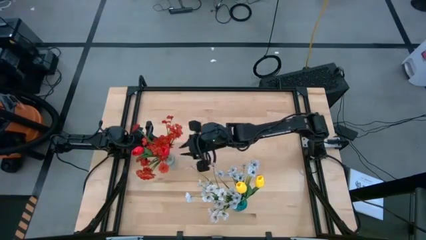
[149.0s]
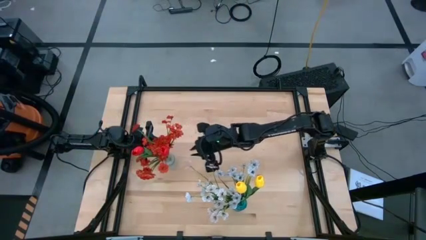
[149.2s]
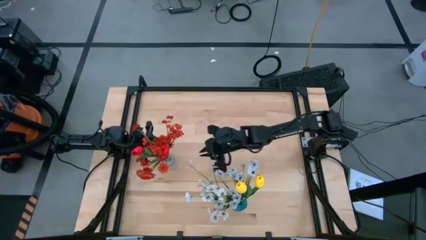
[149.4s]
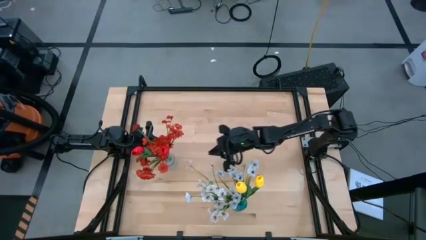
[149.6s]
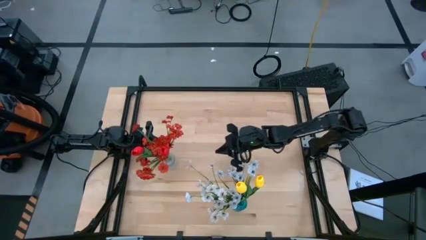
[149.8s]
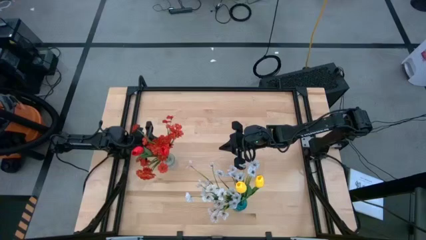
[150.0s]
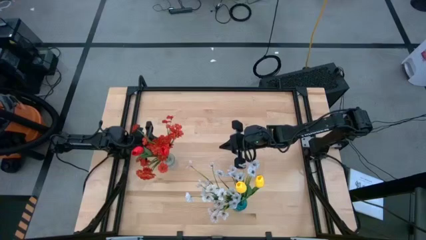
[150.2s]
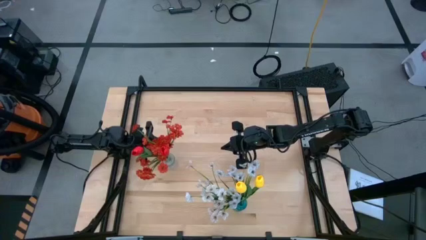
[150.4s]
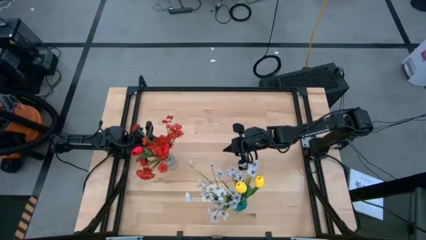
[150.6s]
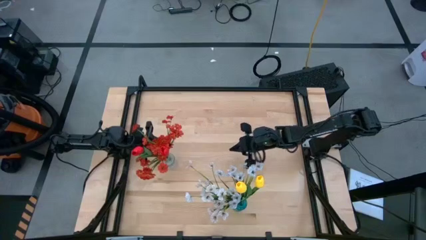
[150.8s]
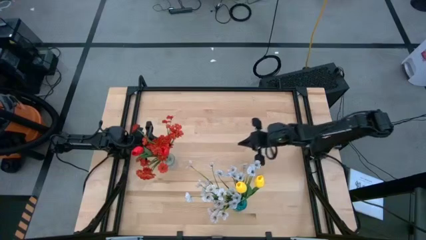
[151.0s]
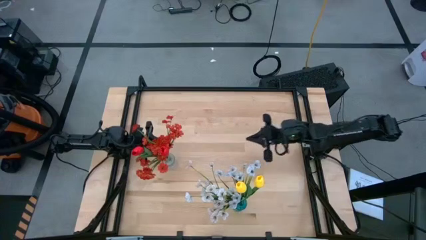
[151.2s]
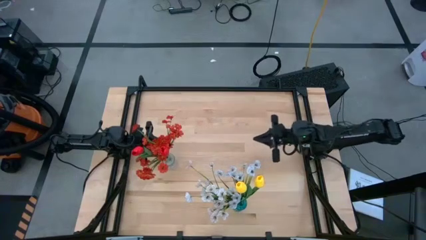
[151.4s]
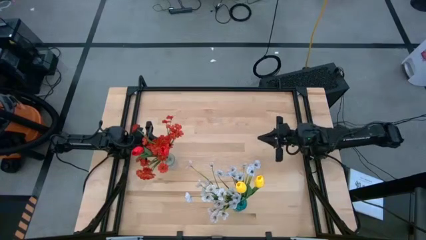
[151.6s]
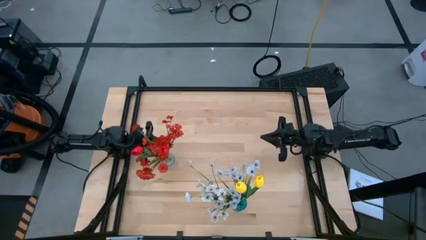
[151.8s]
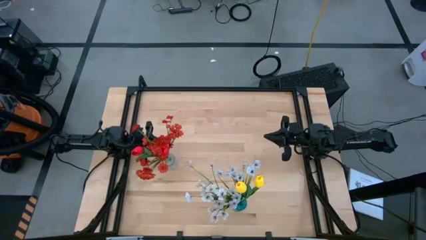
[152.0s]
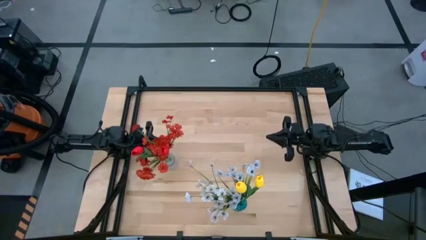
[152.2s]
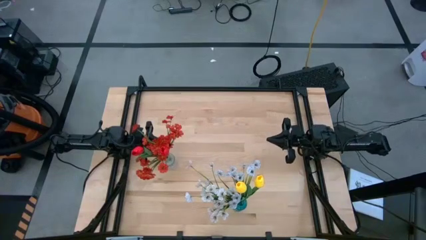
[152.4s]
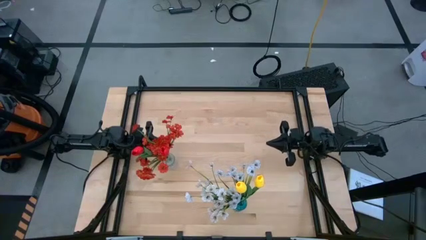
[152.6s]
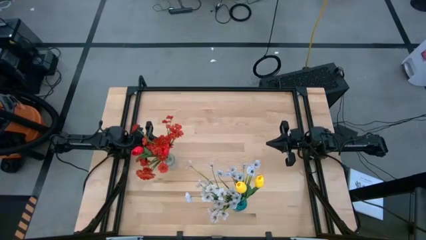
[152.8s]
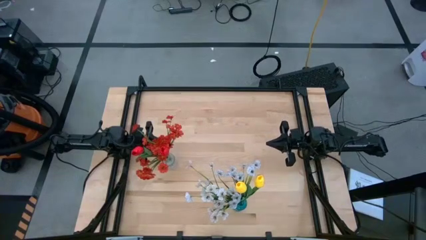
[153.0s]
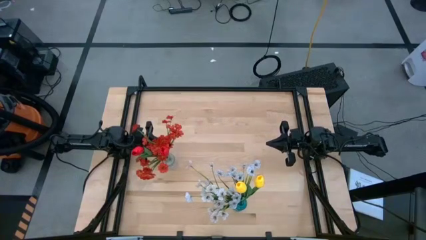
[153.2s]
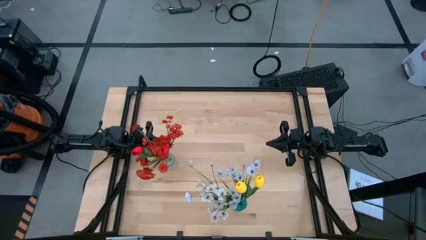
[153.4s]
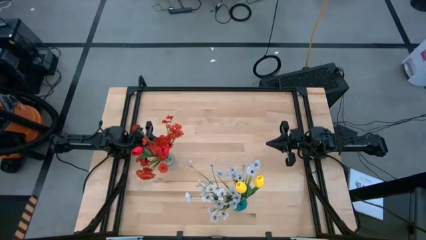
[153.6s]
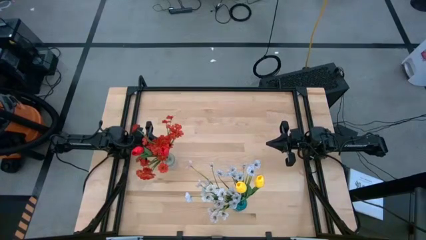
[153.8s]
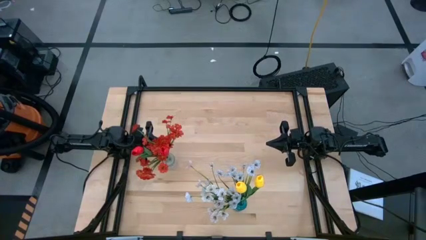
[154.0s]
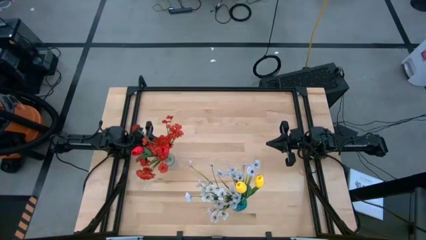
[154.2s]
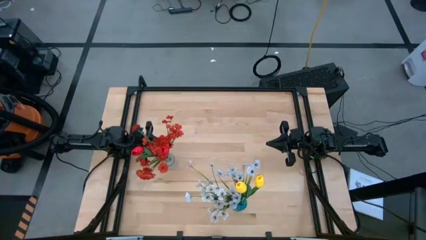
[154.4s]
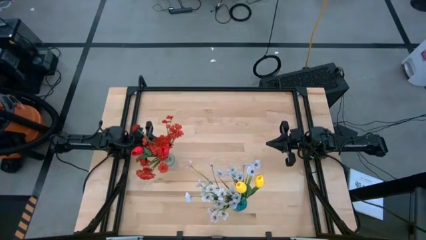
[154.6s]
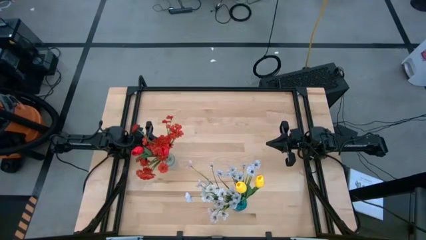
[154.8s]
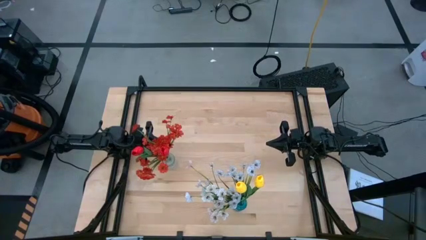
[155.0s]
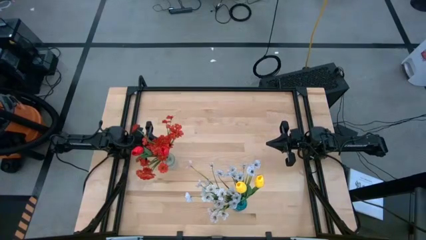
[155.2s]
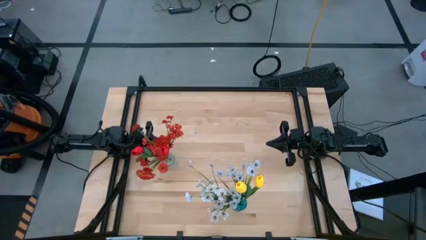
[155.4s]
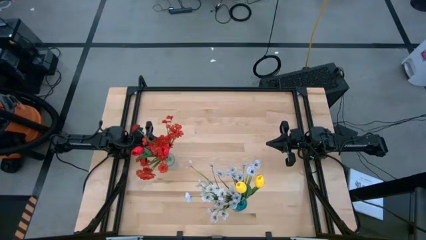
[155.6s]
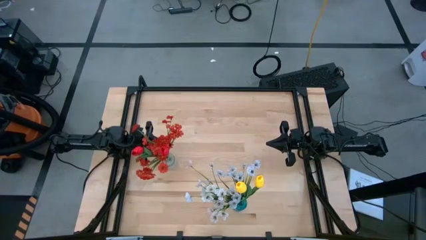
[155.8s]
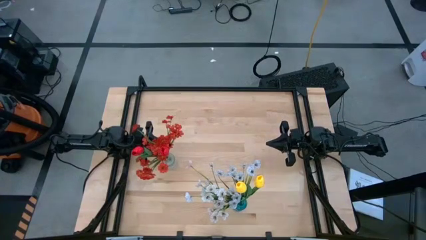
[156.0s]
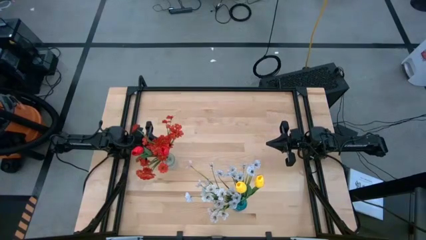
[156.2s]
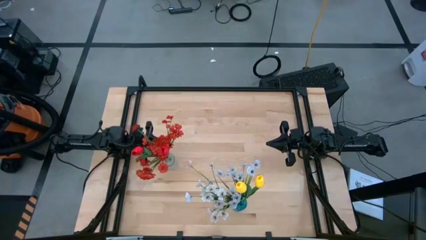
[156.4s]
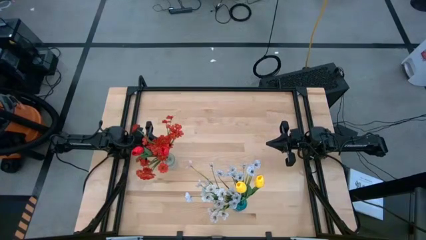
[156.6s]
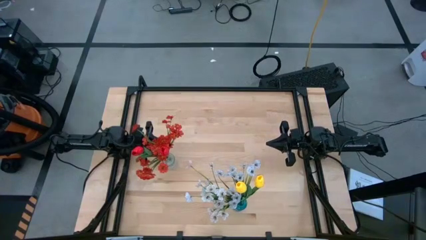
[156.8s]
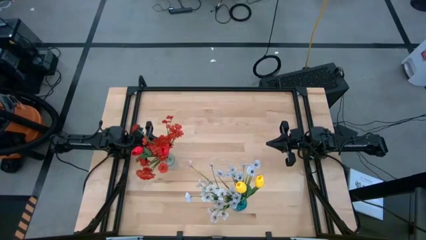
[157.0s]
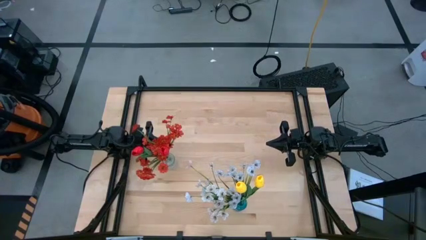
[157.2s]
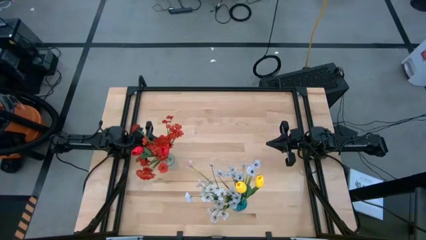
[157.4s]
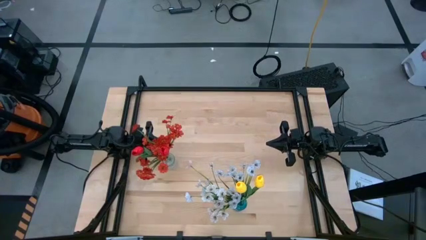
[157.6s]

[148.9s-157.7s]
Task: Sort flowers into vase by color
Return to Home Position

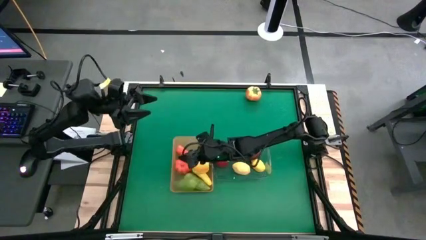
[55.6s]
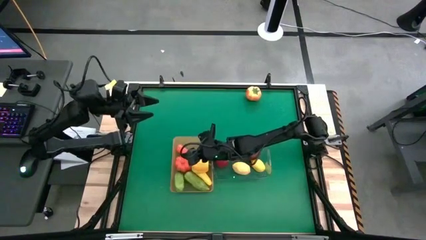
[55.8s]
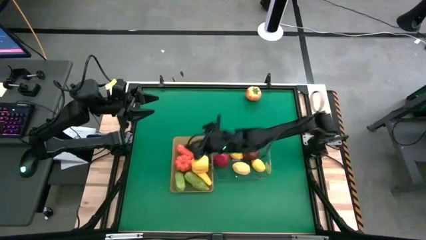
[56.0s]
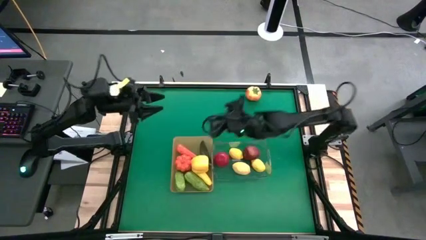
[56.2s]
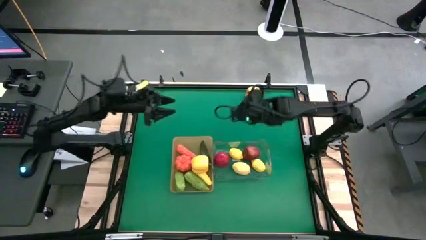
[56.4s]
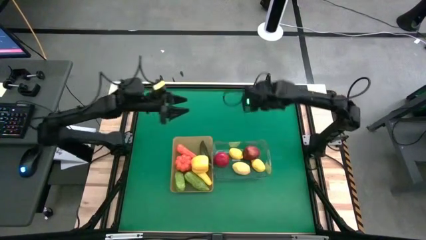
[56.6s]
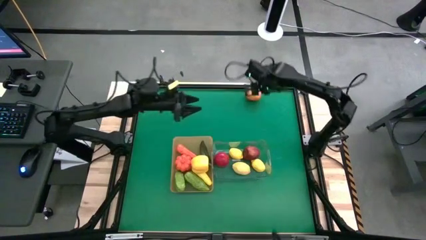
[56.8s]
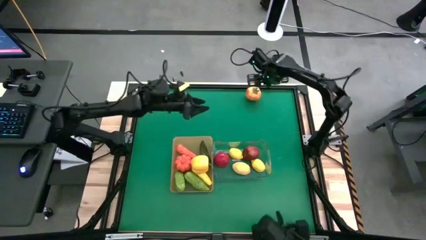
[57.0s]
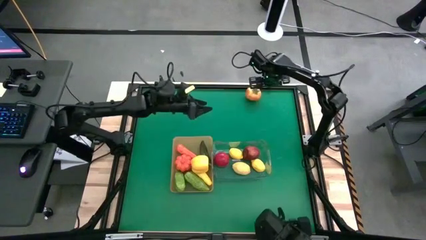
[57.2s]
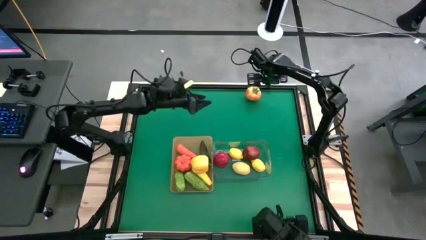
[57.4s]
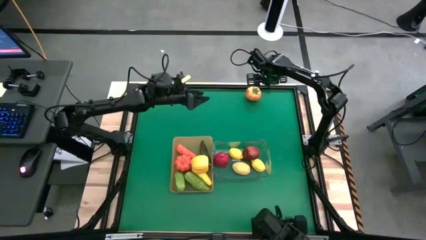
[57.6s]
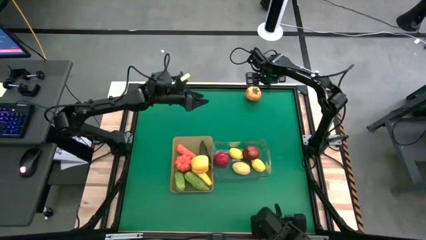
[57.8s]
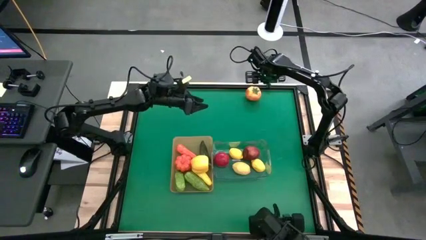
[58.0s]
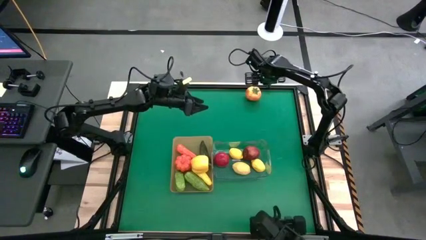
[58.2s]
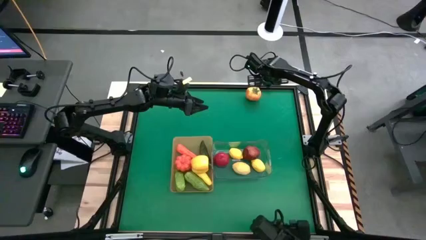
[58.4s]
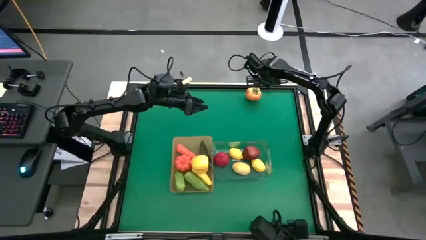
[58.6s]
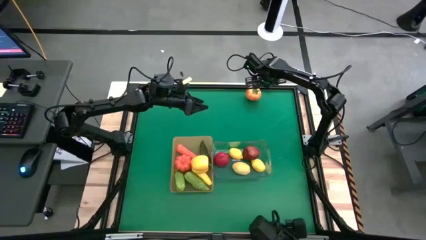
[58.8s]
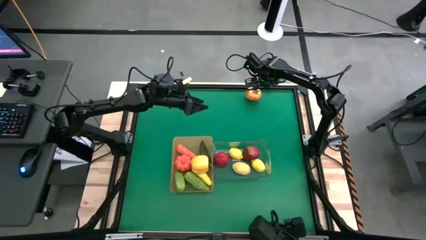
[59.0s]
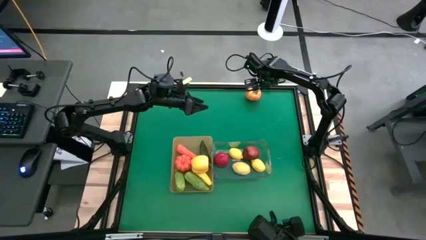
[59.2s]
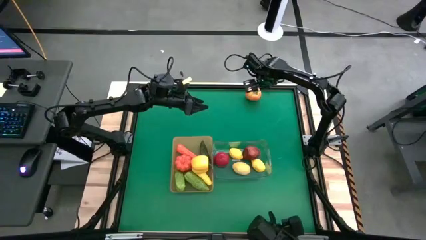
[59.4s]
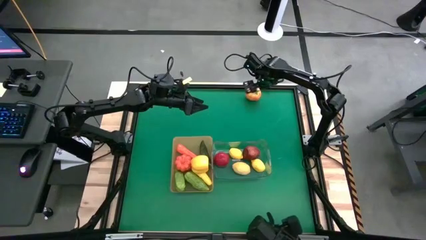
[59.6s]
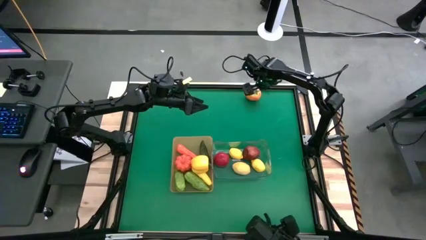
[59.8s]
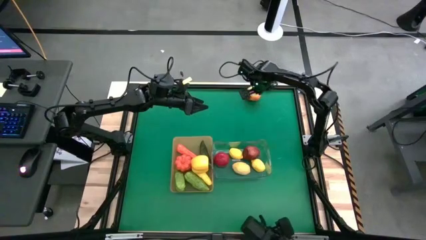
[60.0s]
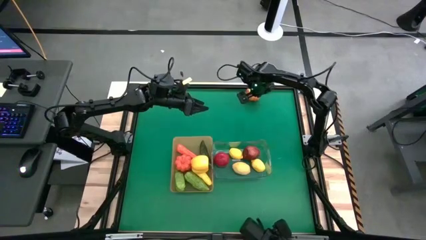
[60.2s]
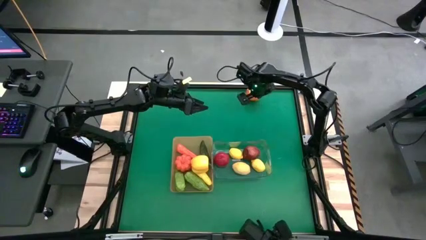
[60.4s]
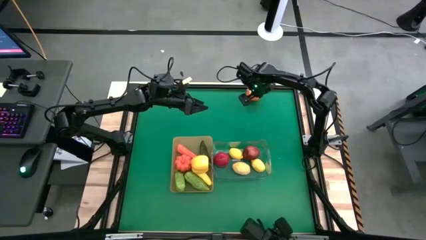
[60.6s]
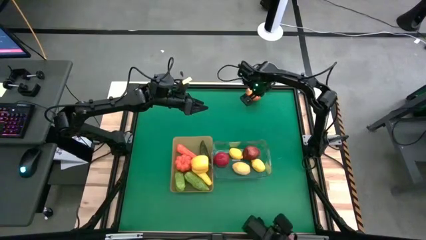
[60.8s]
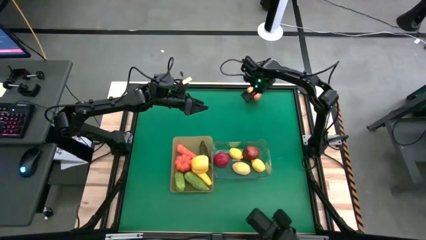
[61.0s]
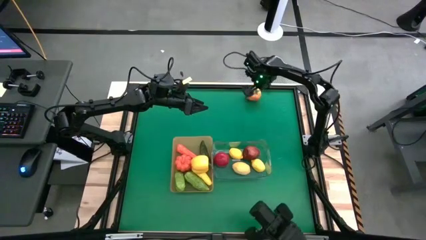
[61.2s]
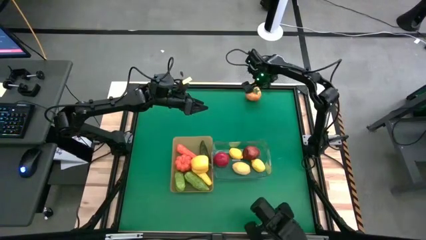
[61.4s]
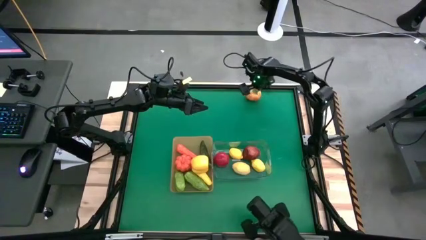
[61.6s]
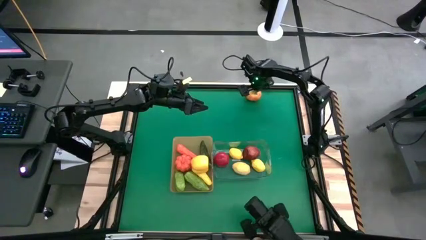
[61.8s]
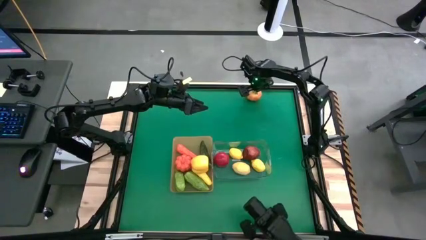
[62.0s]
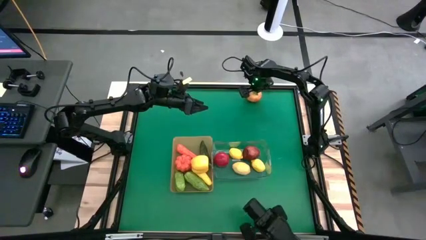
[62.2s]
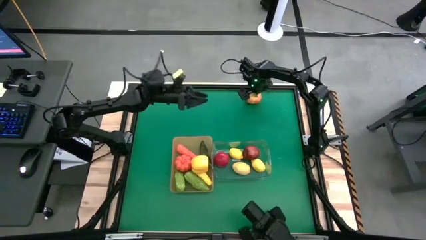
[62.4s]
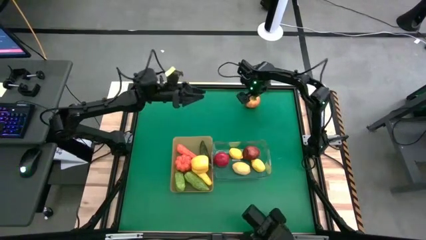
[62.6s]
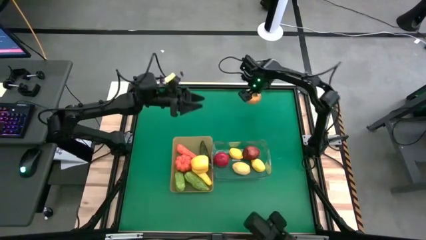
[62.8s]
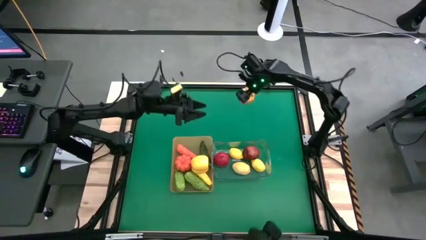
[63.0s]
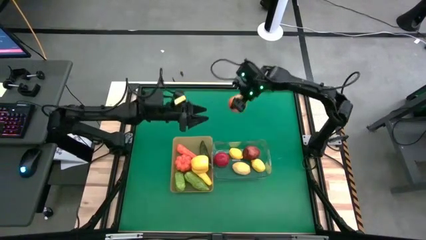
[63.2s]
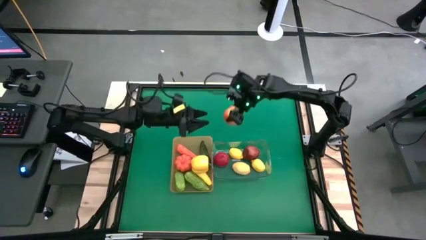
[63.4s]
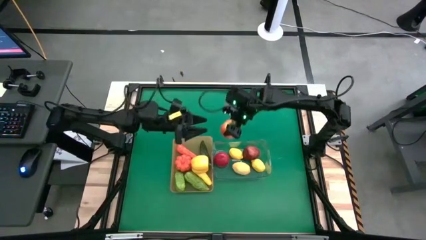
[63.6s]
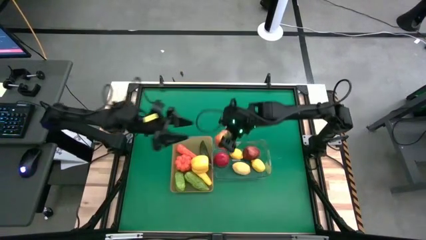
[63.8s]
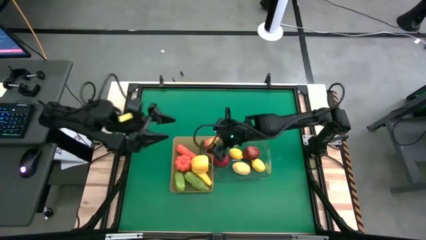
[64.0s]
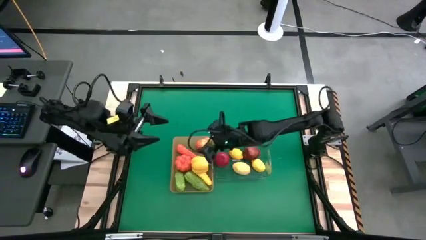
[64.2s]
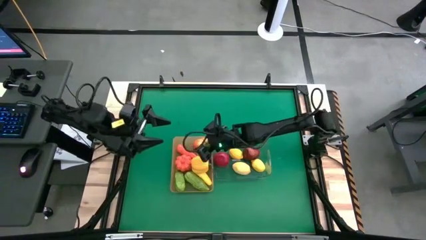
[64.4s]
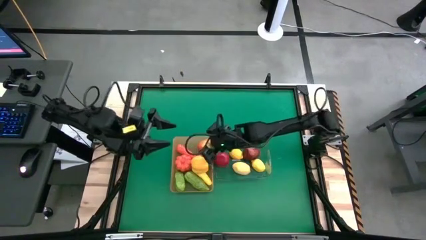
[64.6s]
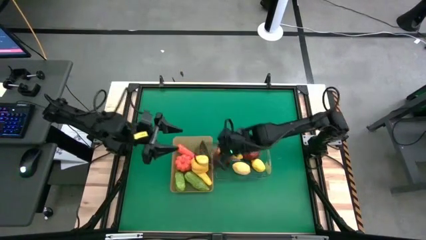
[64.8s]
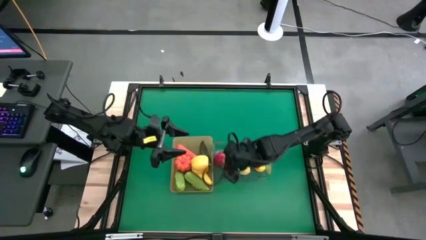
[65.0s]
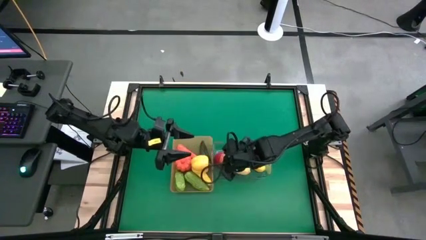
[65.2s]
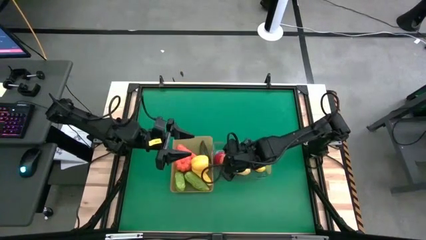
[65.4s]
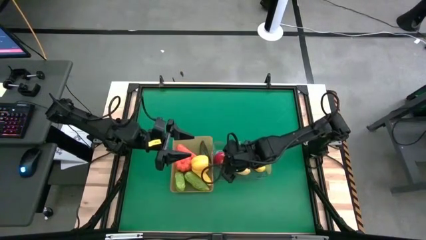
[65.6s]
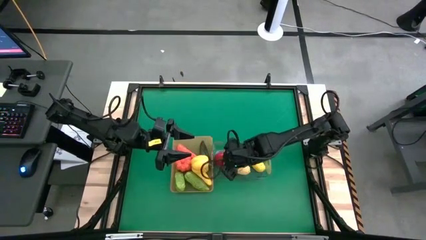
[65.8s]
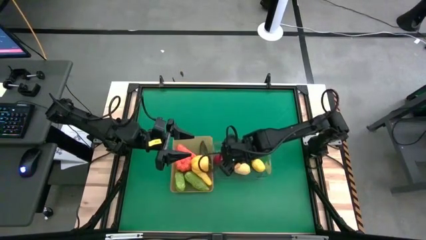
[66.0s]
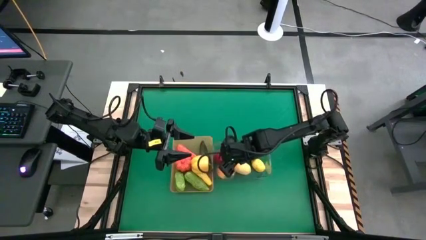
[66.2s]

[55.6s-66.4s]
Task: Sort produce into baskets
Put the tomato into the transparent bin
